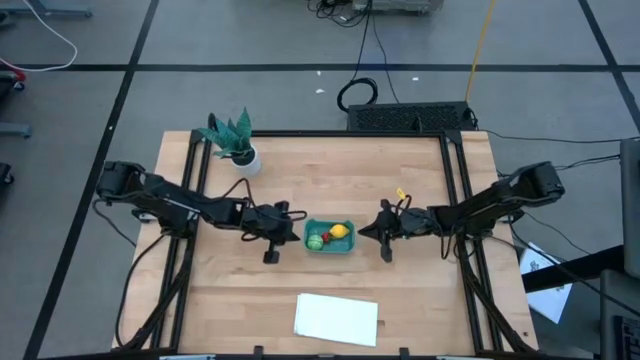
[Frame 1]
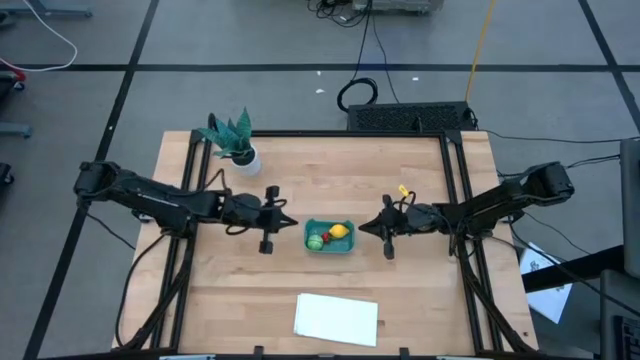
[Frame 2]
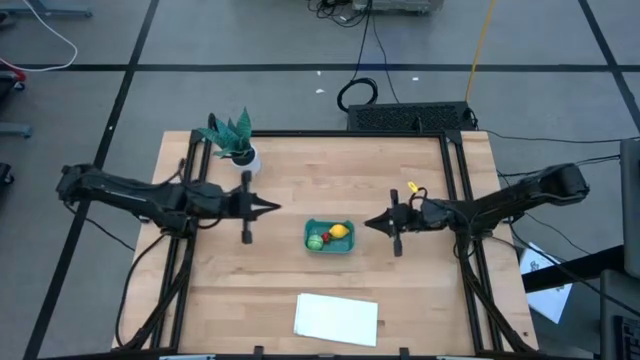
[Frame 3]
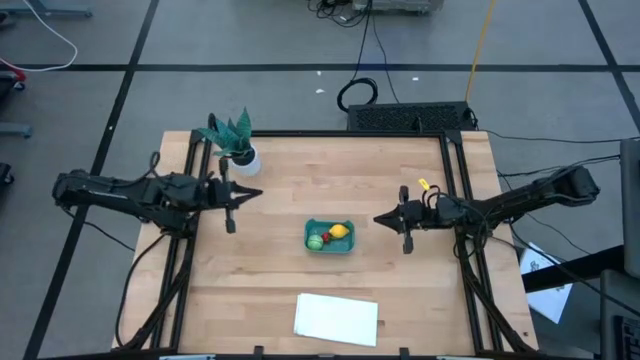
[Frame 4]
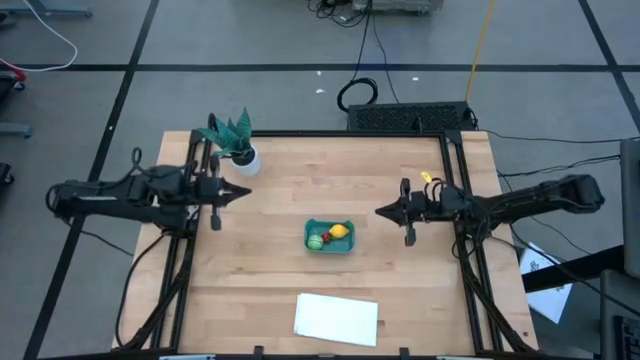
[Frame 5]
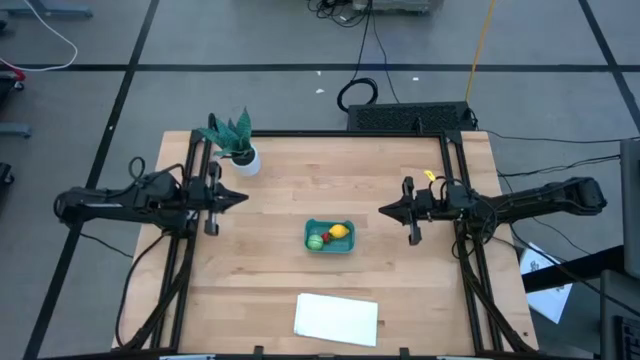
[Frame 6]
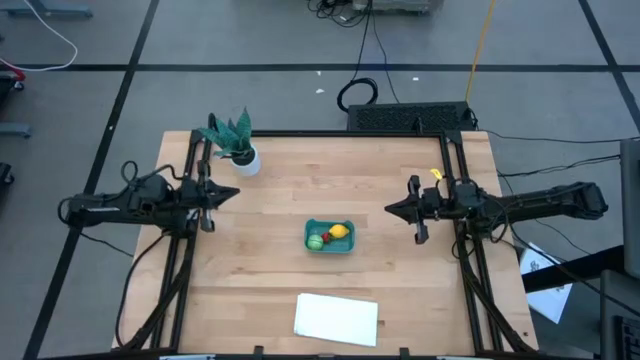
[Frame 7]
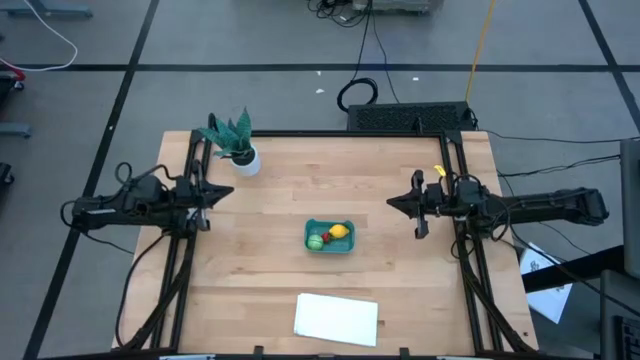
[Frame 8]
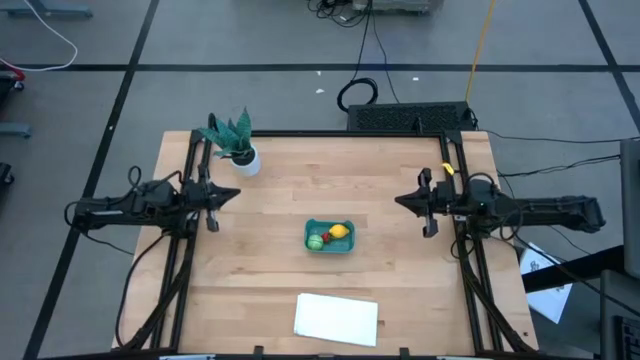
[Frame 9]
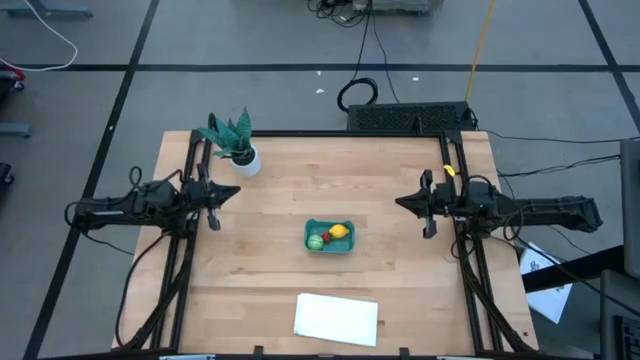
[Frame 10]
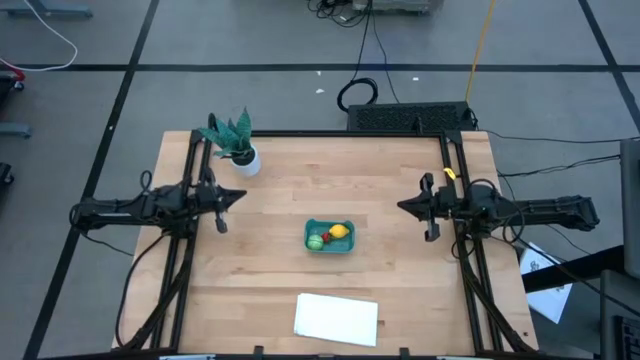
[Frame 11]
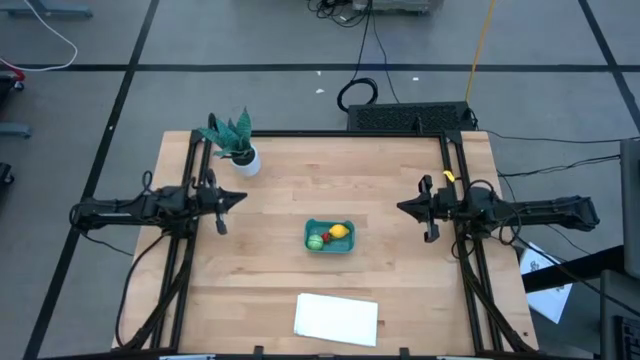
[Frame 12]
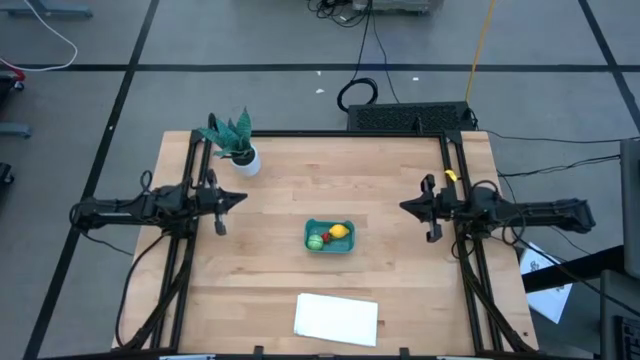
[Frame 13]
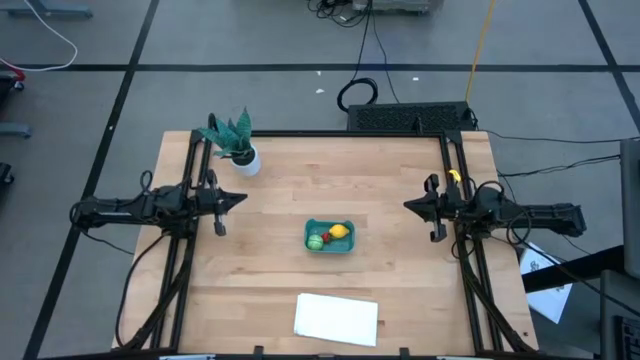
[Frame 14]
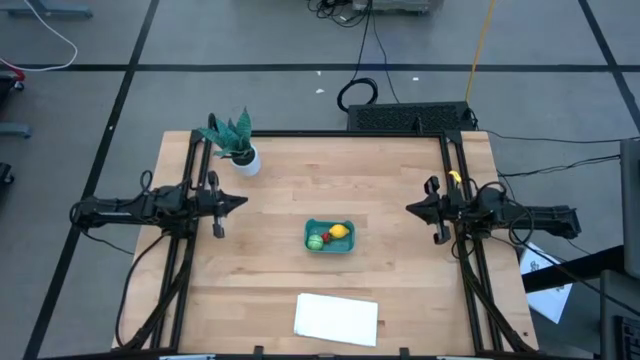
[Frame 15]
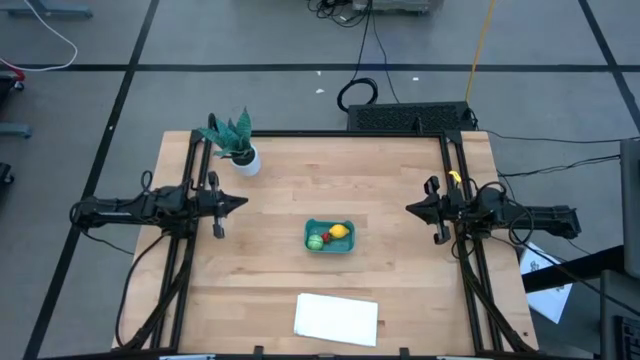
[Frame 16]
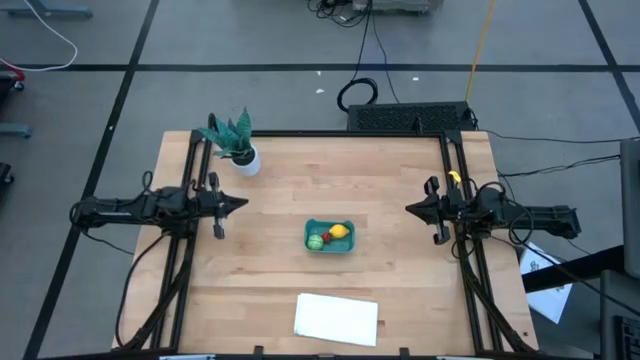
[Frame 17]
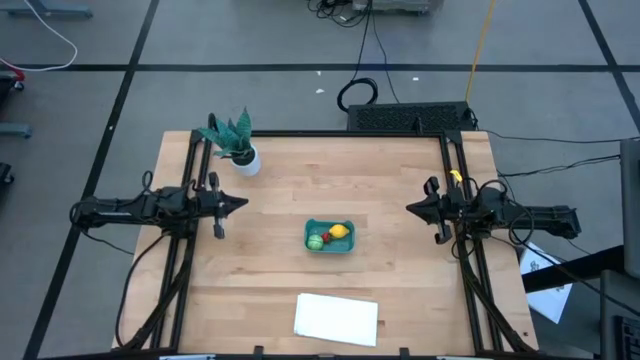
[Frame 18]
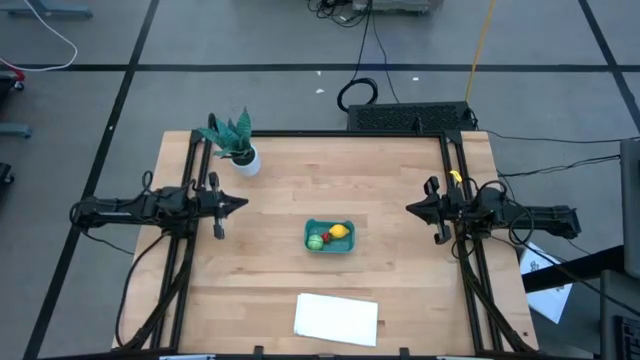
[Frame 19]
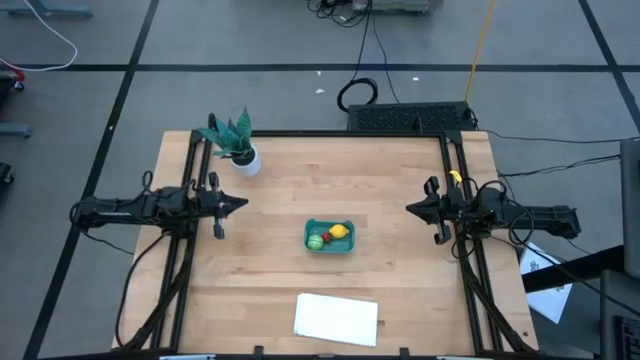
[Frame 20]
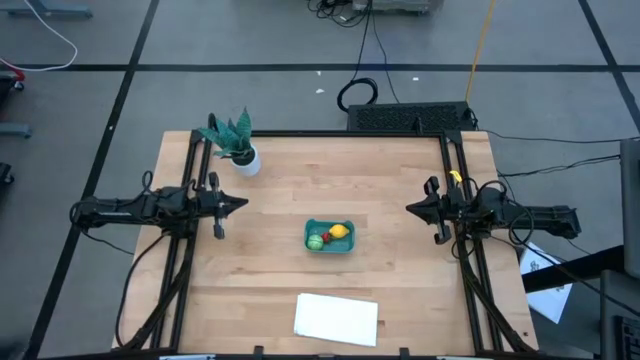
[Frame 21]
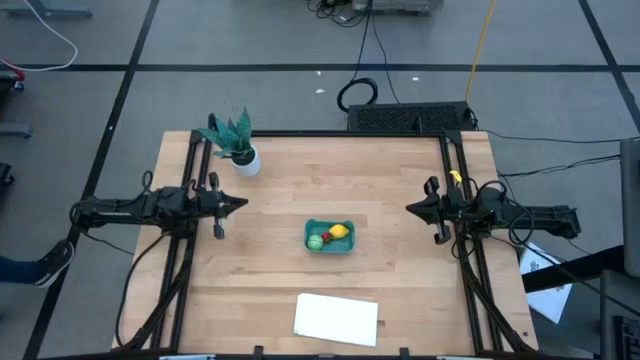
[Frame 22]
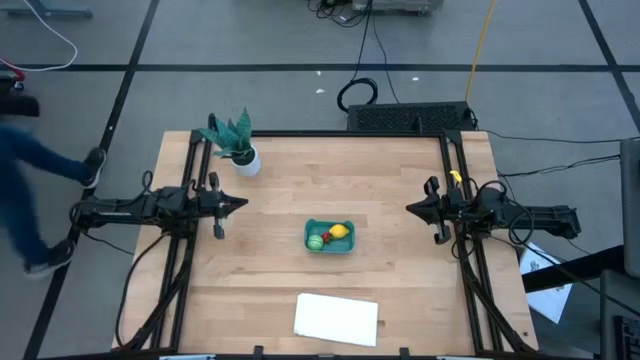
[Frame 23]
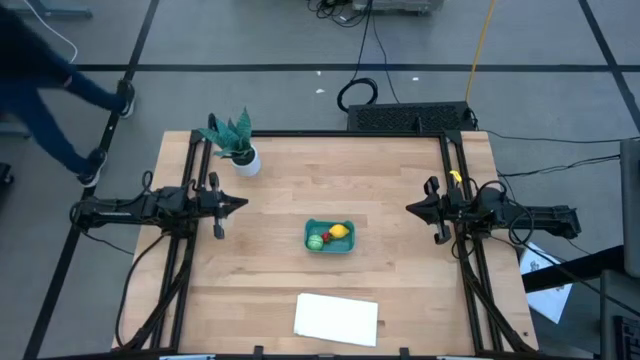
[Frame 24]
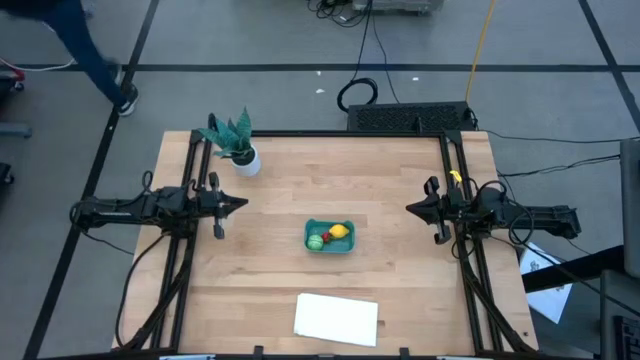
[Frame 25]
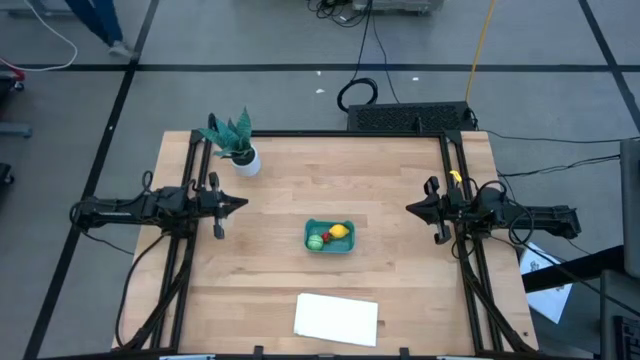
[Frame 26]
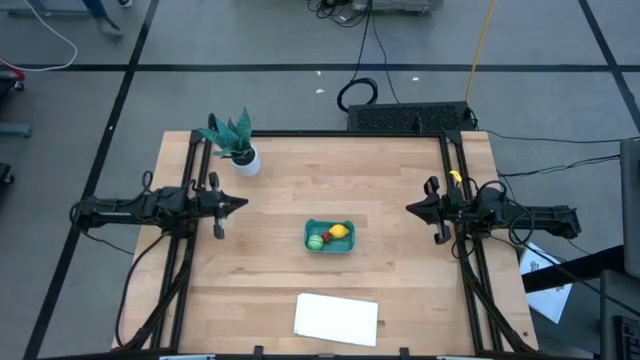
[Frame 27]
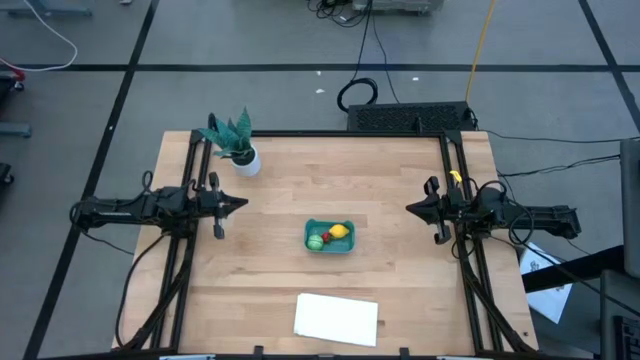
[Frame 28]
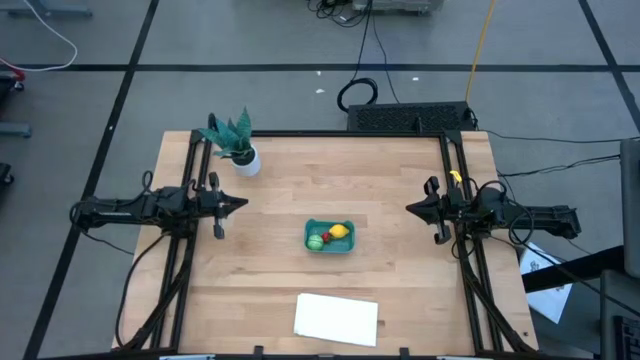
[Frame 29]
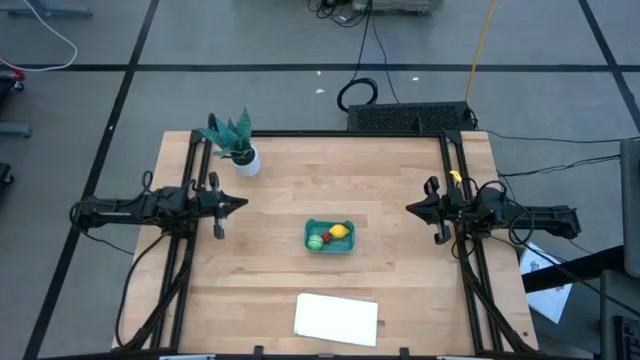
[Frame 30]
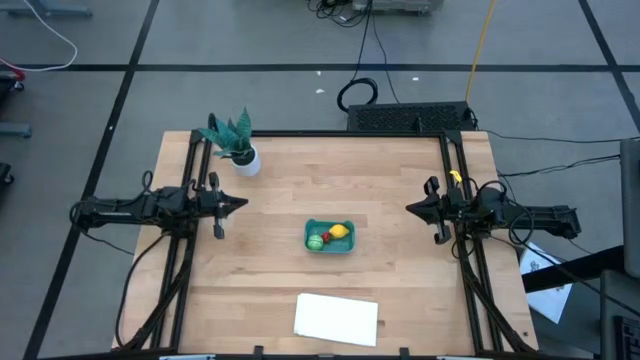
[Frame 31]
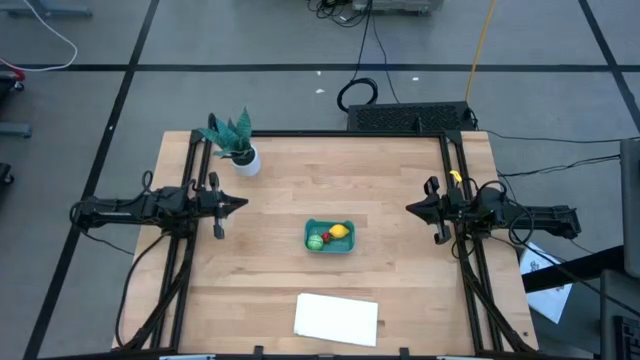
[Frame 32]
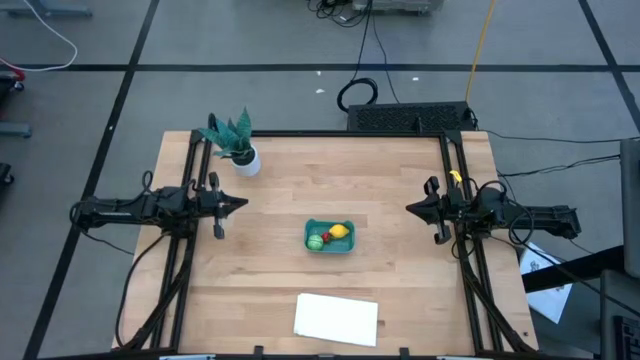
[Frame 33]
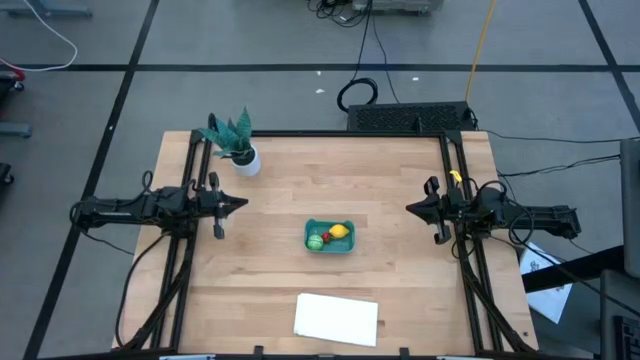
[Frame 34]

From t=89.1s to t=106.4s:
Task: Pick and placing Produce into tupperware
Return to Home Position

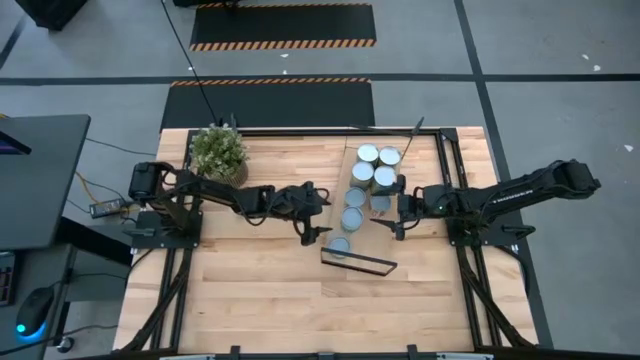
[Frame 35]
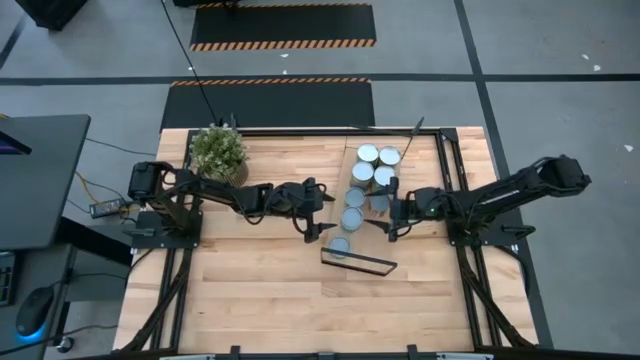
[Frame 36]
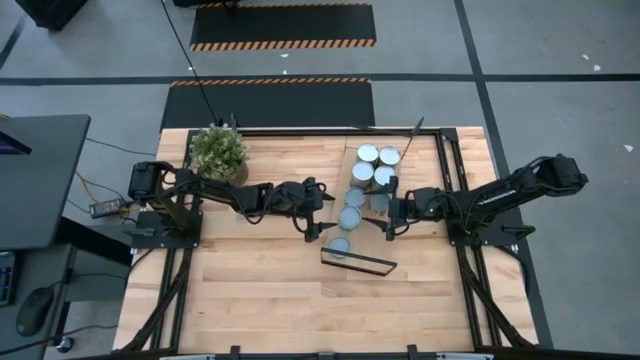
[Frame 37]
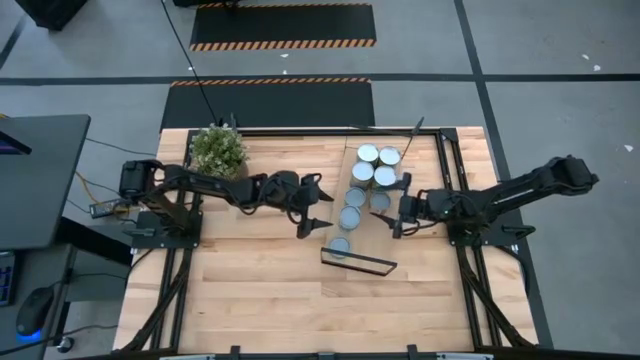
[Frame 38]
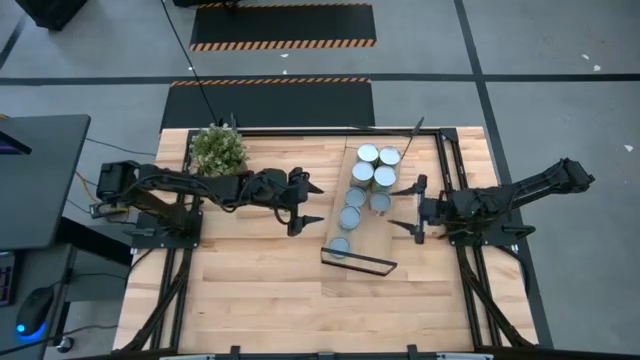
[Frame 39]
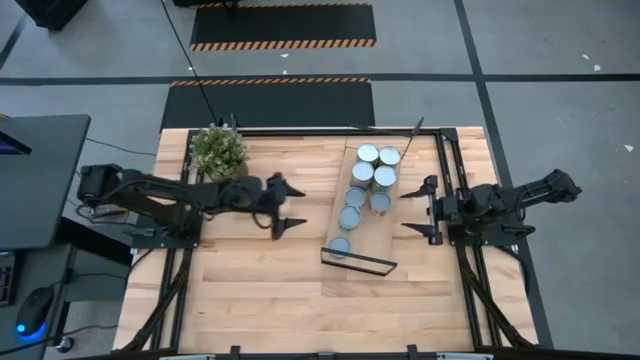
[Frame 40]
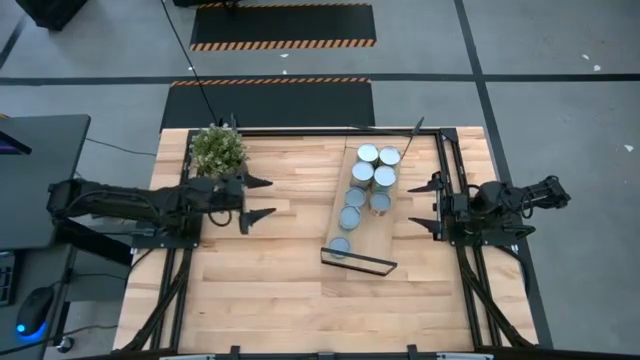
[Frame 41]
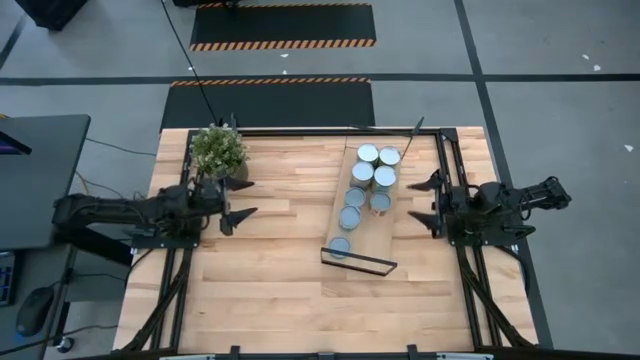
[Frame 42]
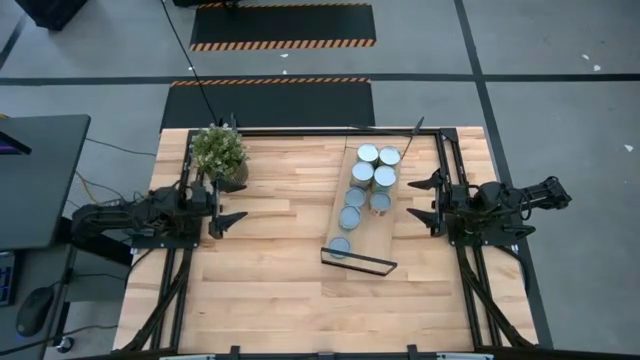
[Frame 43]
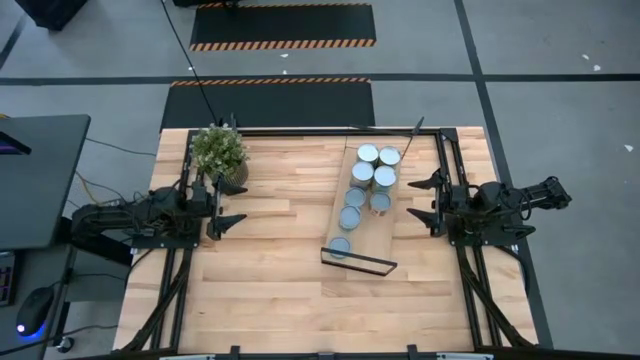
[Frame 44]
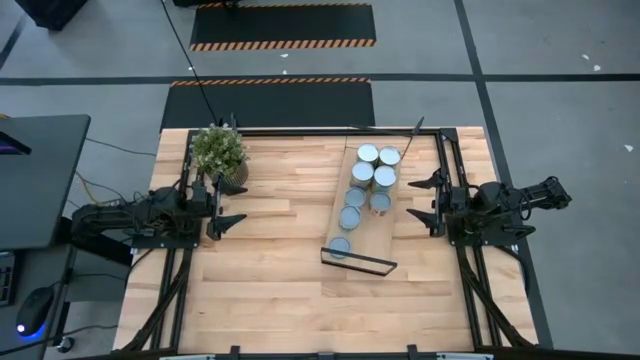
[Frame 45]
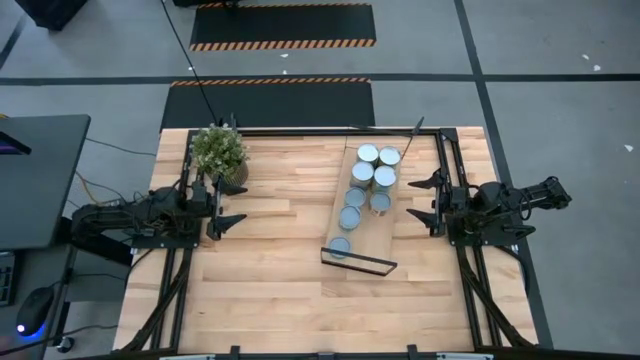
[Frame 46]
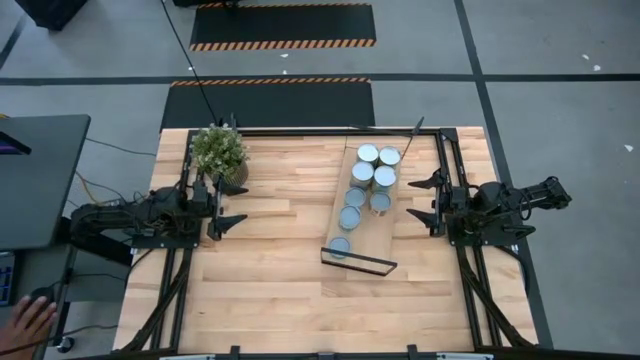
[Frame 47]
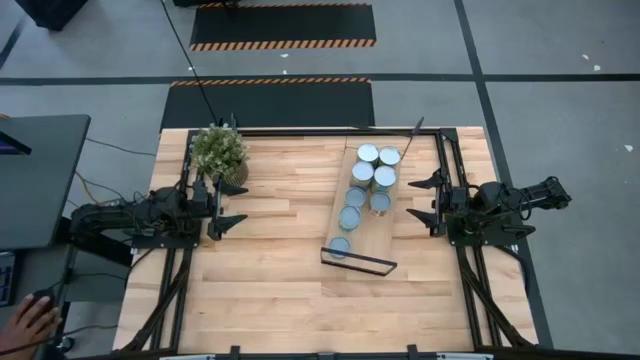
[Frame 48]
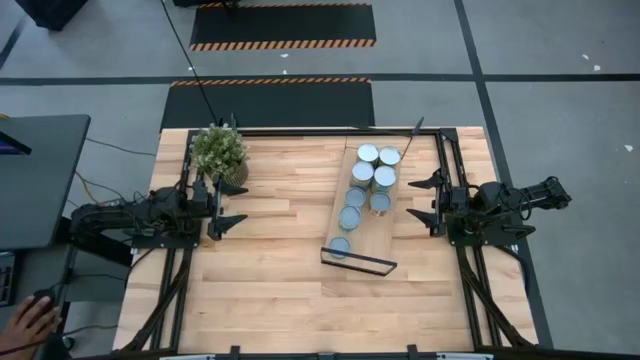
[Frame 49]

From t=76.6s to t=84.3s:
Task: Pick and place cans onto a shelf
Return to Home Position
